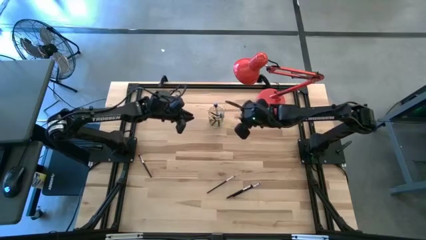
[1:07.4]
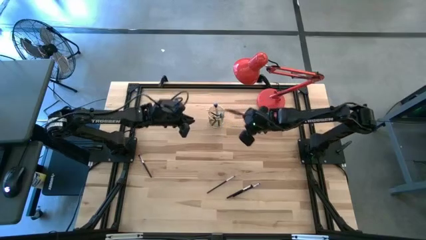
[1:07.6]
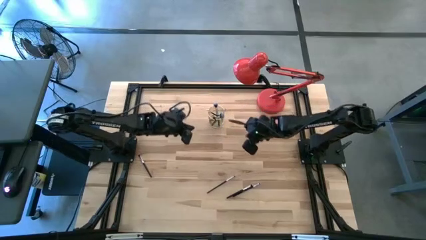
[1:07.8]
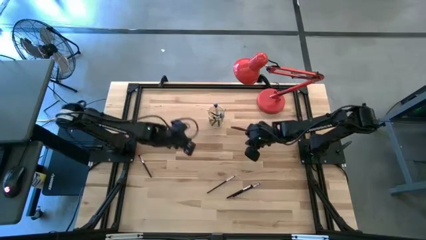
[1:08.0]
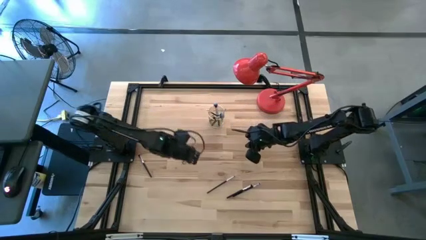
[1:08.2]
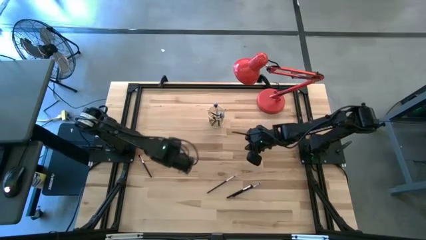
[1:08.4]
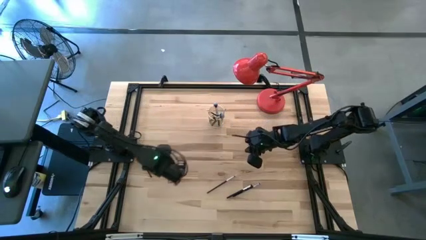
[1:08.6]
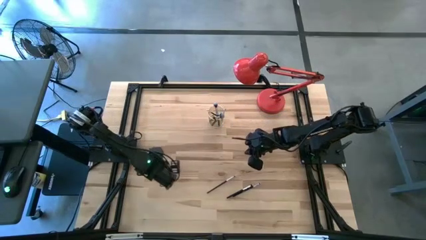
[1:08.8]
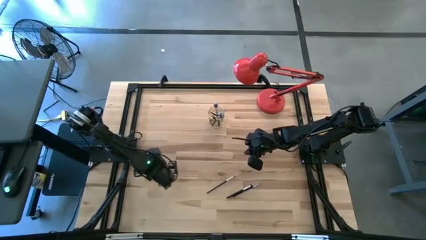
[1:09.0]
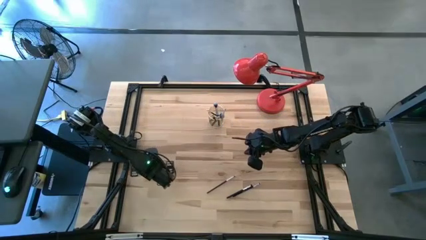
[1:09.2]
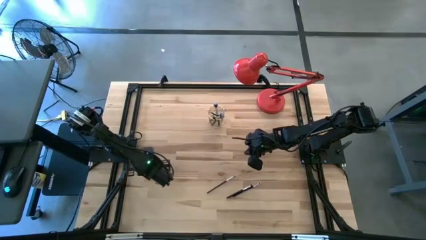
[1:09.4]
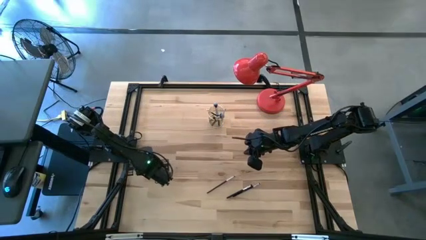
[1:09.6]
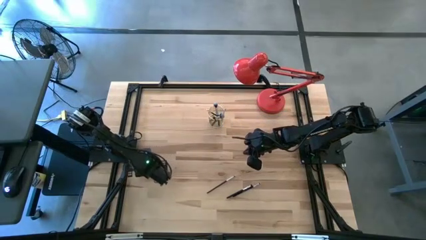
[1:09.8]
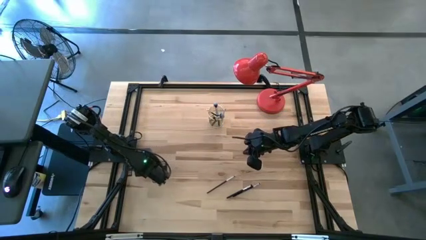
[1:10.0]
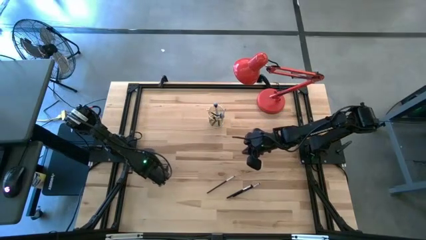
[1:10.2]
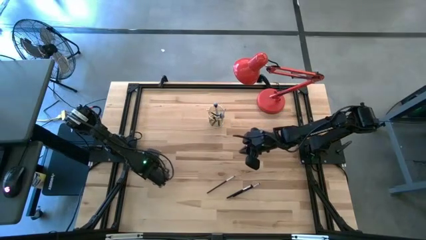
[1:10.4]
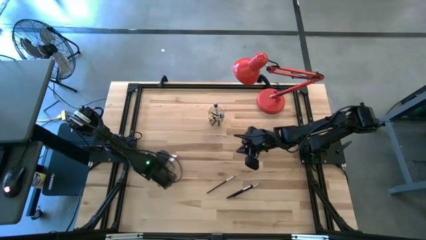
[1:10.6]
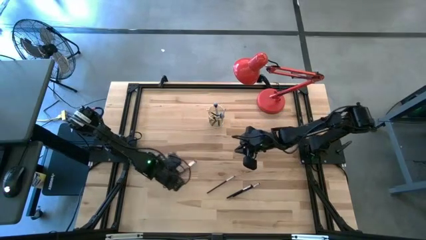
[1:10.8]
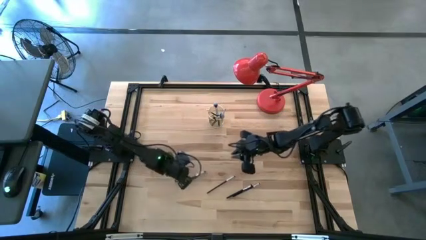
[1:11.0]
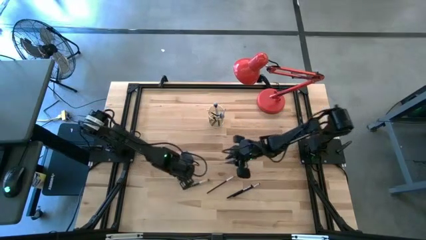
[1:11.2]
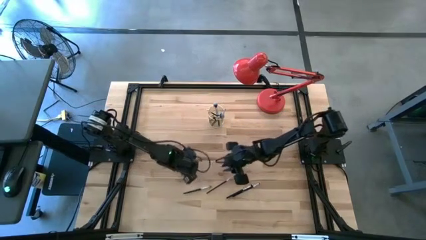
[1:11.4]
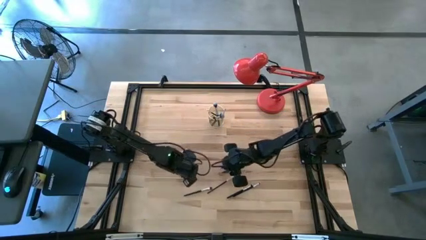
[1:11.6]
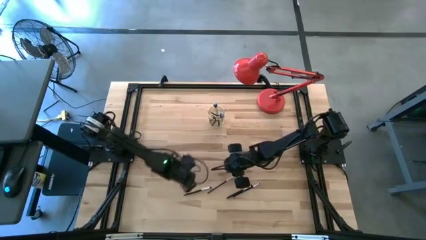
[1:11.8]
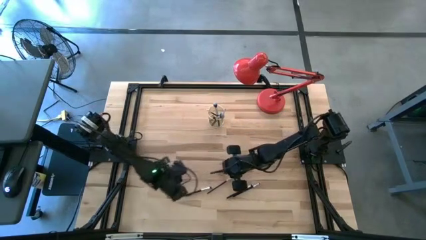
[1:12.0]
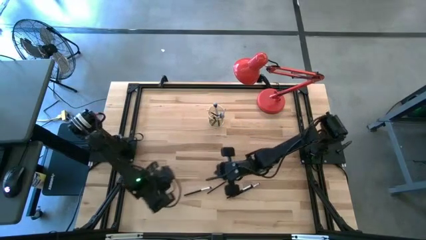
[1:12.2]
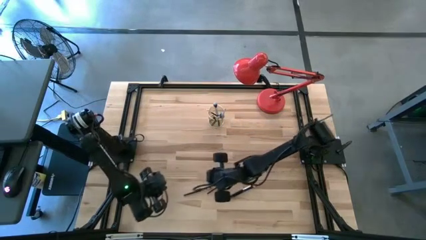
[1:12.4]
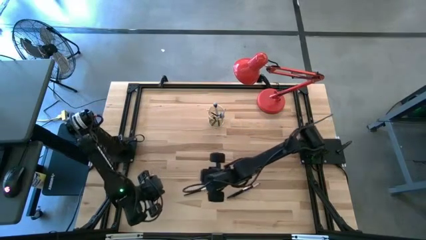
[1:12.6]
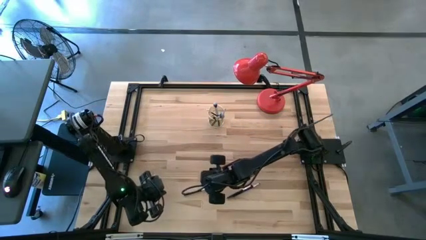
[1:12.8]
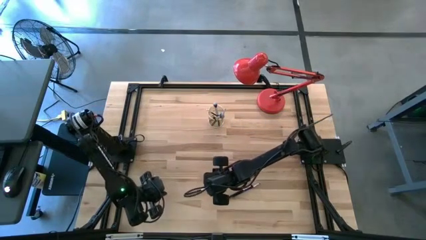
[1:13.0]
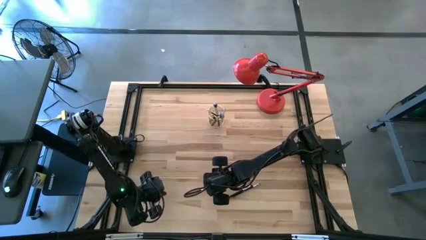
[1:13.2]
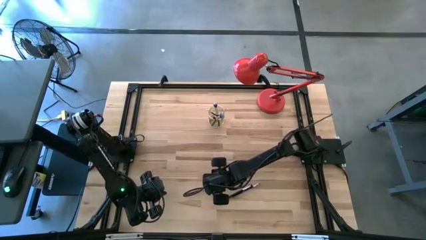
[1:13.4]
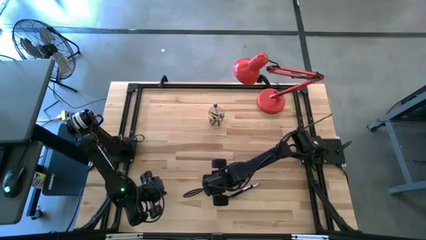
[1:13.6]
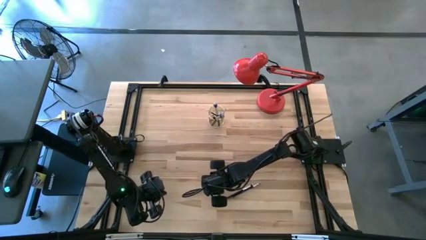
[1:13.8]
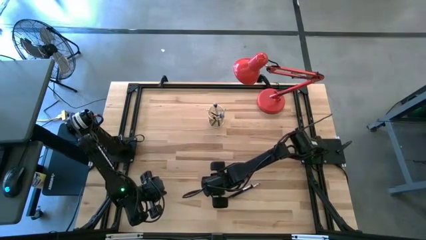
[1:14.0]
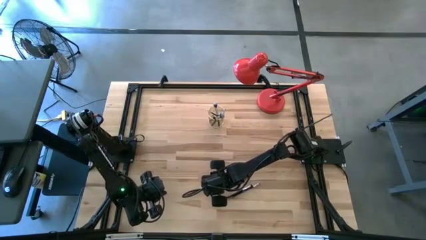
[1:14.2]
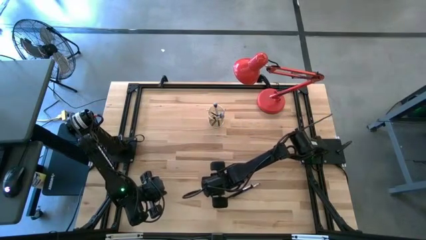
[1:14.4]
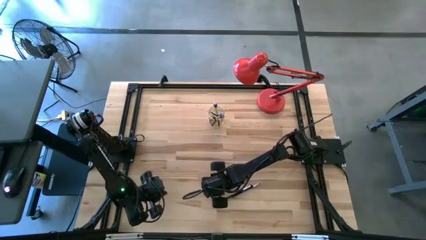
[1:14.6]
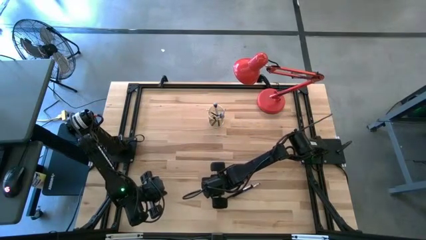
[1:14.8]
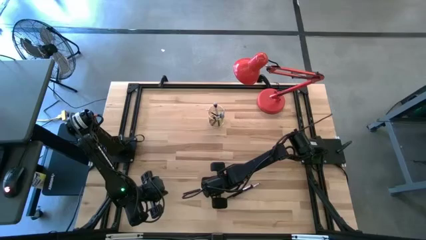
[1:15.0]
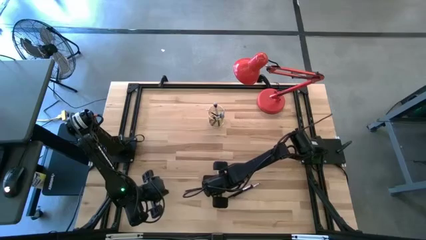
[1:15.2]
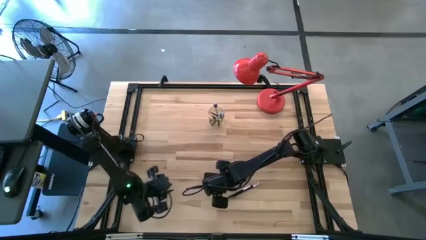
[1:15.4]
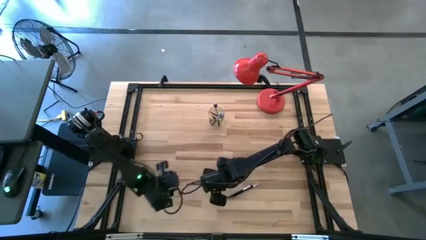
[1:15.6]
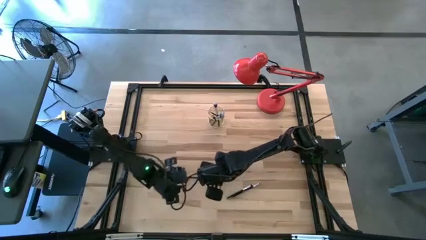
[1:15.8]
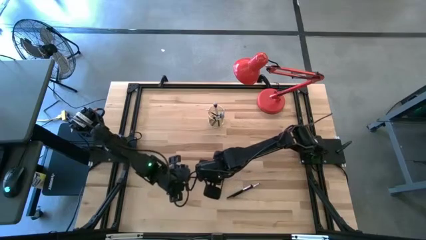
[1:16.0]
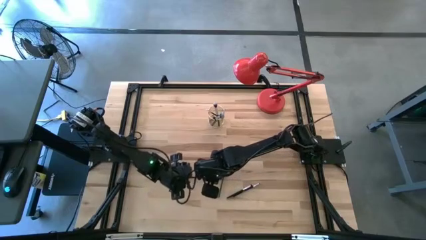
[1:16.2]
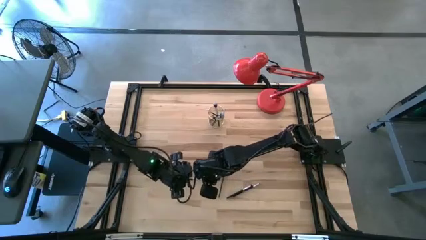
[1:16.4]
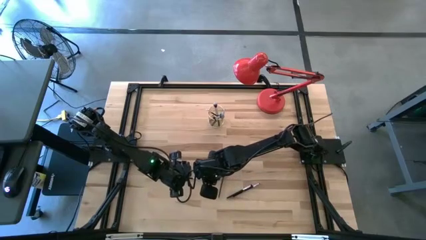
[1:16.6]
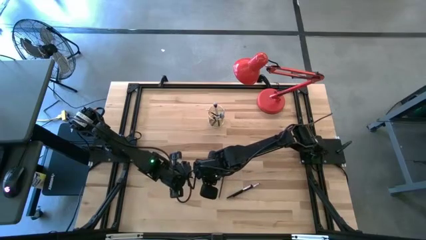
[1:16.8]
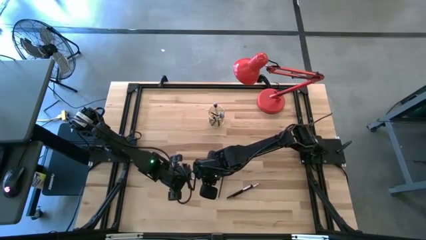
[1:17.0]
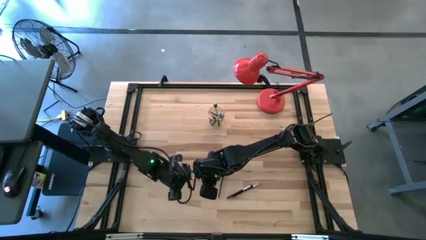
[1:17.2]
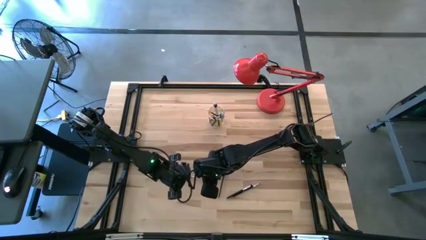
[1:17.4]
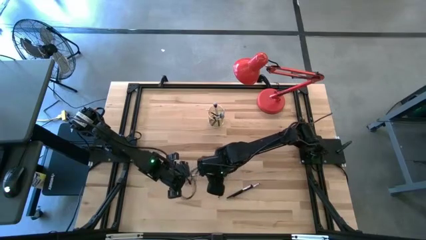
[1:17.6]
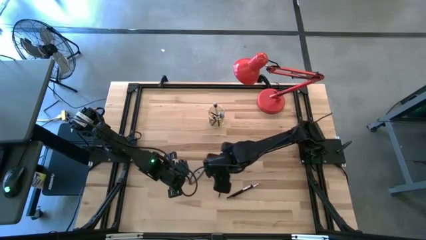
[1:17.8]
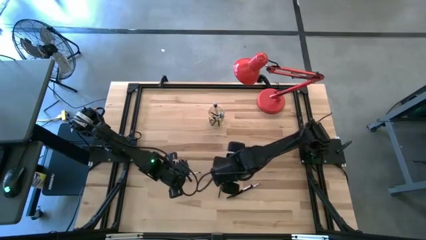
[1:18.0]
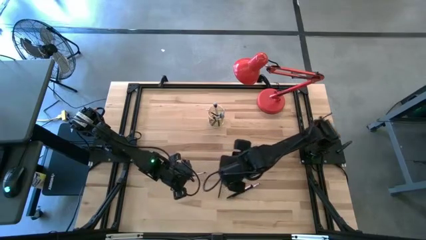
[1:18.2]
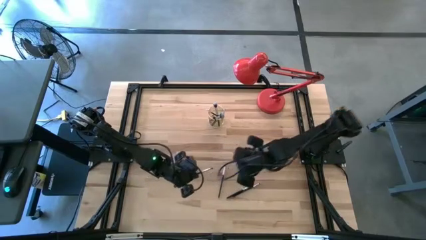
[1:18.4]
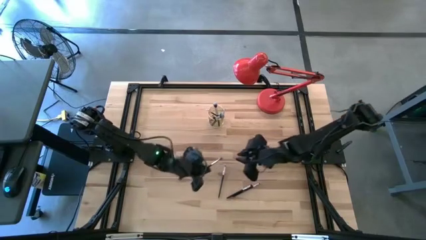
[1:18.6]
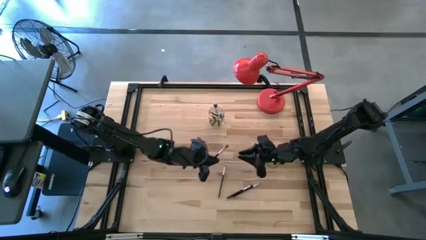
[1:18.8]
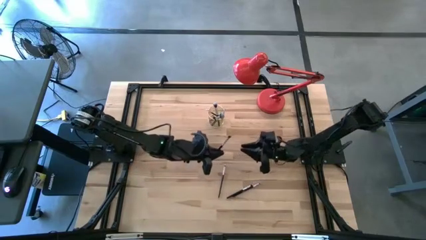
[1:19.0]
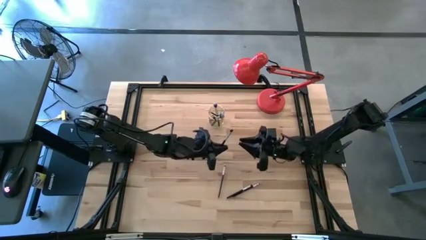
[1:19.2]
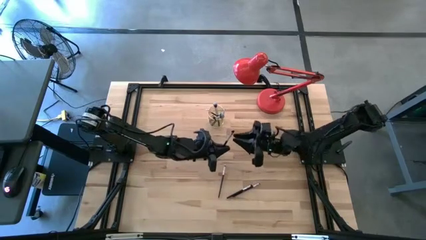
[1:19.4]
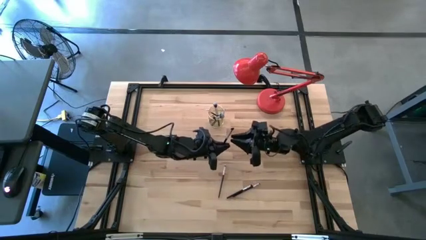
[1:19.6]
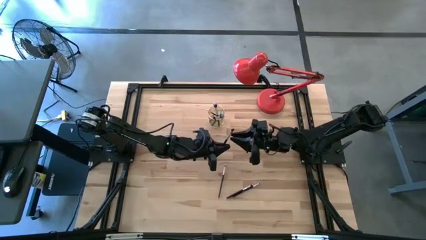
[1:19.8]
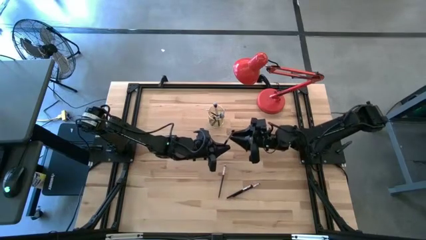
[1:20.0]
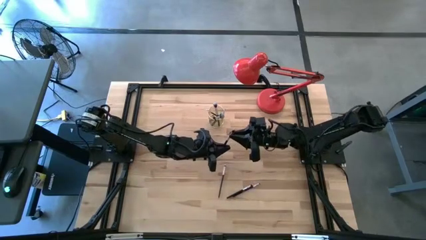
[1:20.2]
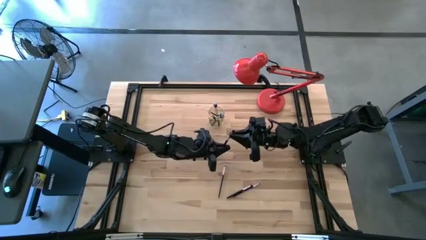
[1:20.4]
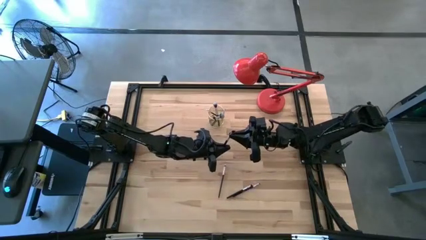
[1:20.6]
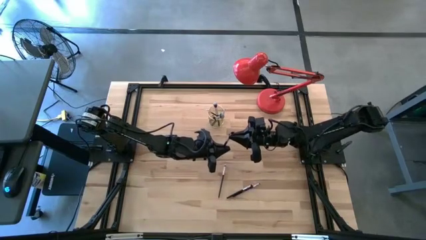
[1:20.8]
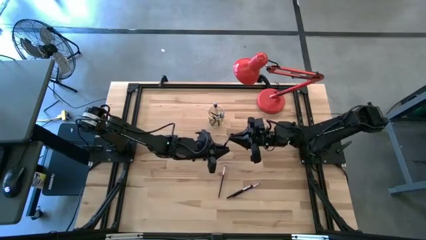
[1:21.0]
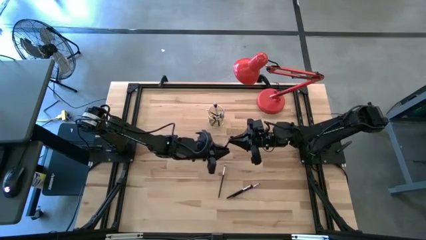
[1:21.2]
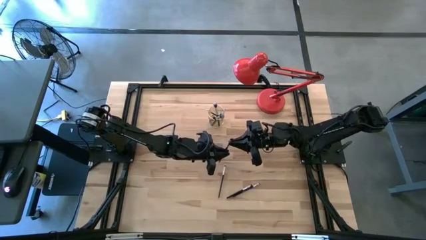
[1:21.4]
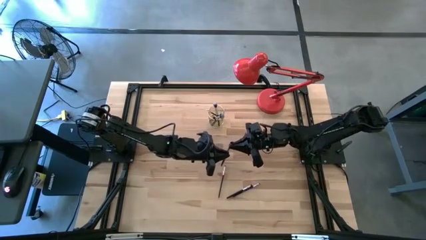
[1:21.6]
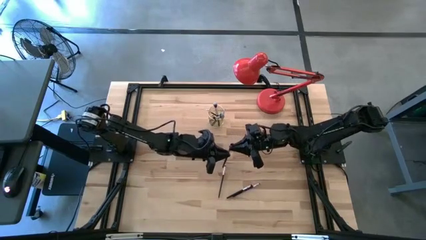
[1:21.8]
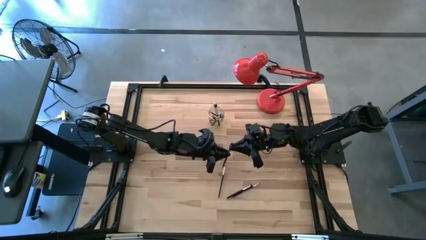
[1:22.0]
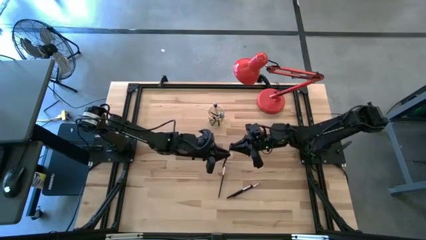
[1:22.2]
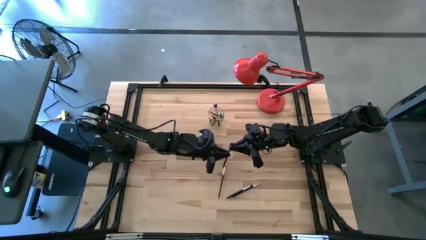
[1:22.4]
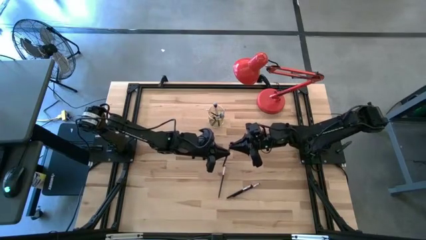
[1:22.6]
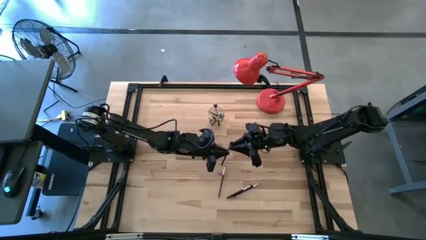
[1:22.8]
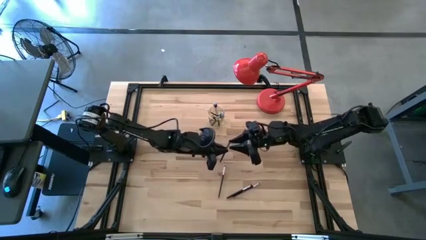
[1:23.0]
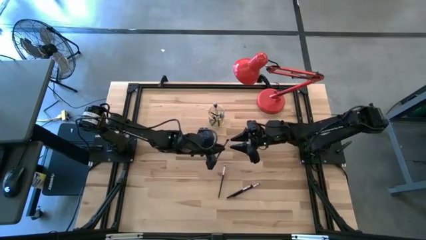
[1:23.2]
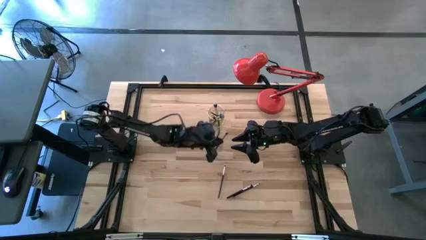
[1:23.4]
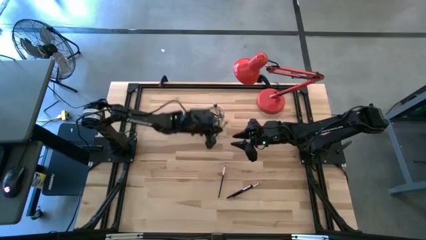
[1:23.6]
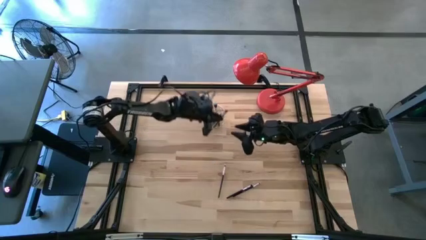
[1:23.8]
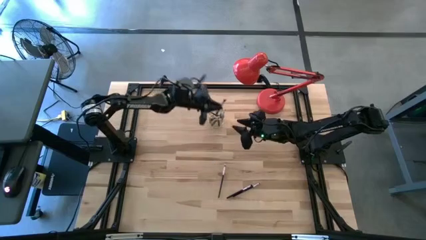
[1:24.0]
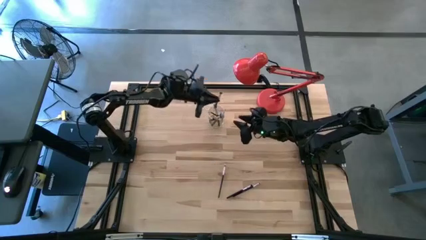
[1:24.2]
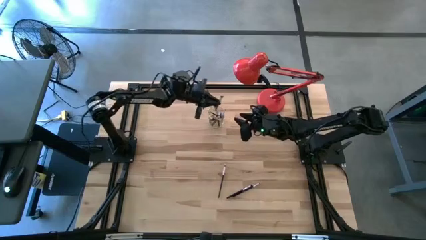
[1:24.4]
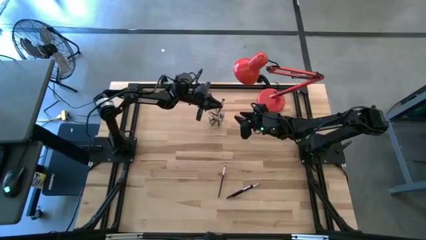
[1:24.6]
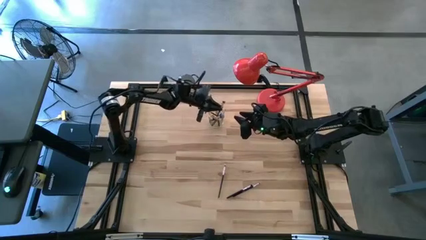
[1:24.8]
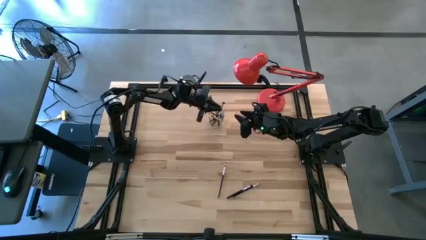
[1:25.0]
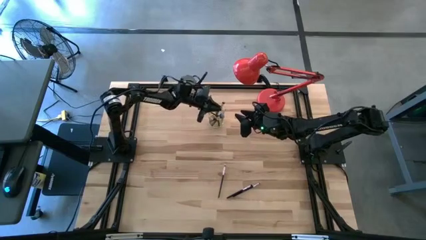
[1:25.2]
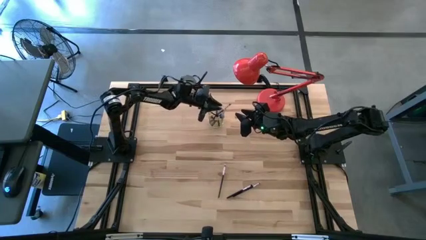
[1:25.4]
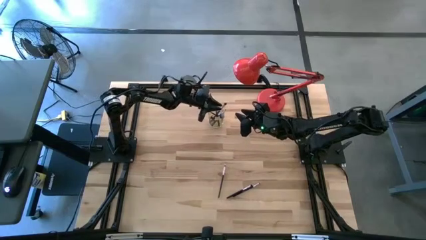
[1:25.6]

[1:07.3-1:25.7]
Task: Pick & Place Makeup Brushes
Put the left foundation brush into the makeup brush holder
